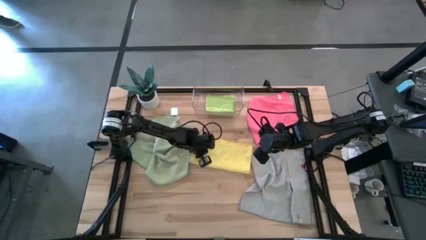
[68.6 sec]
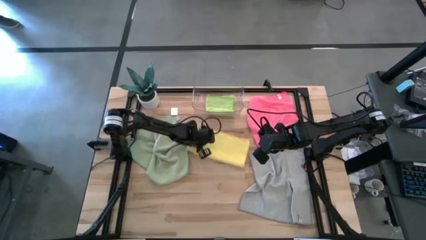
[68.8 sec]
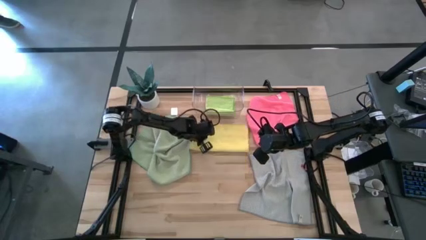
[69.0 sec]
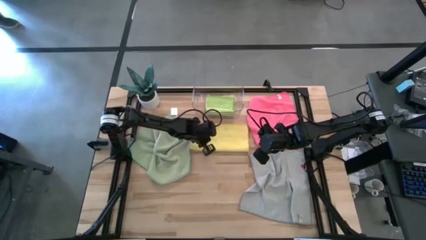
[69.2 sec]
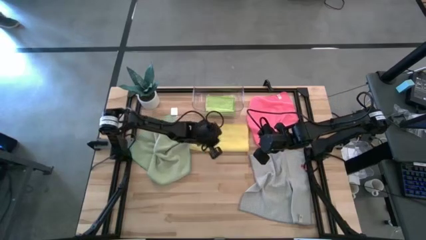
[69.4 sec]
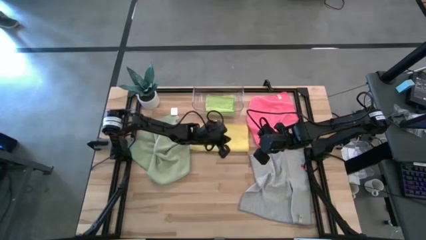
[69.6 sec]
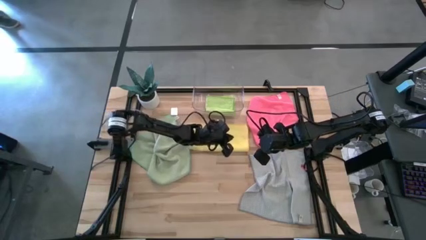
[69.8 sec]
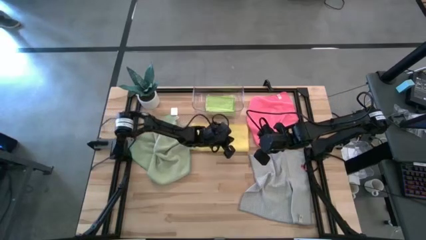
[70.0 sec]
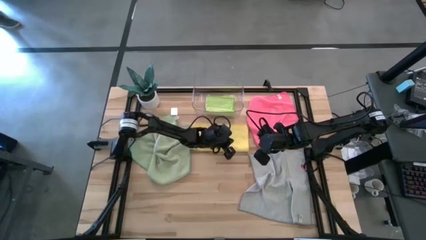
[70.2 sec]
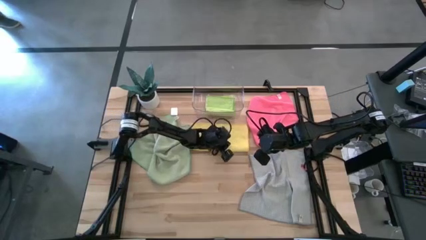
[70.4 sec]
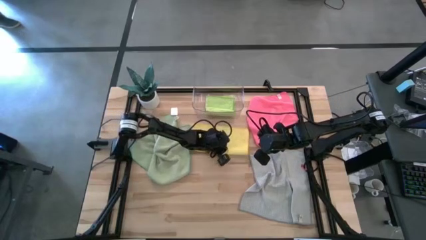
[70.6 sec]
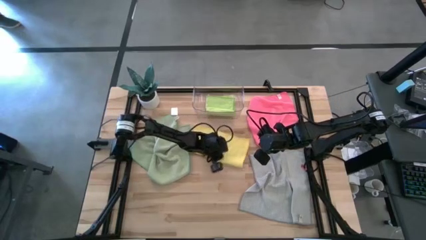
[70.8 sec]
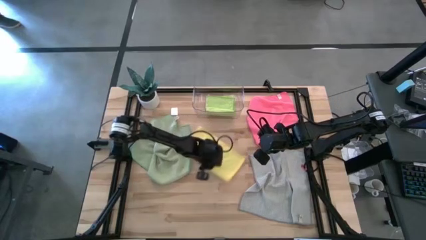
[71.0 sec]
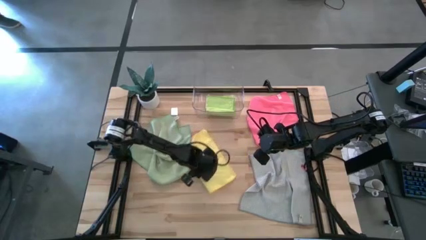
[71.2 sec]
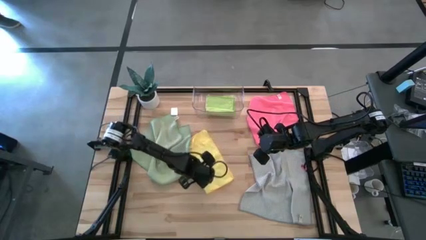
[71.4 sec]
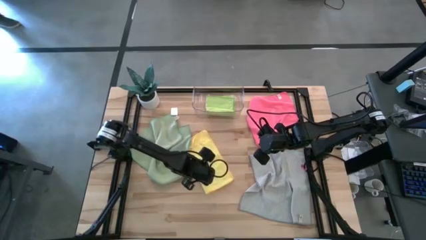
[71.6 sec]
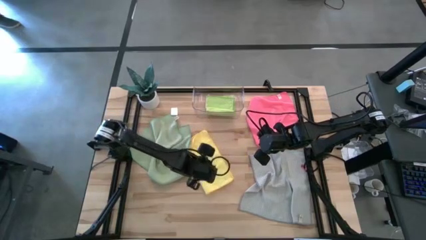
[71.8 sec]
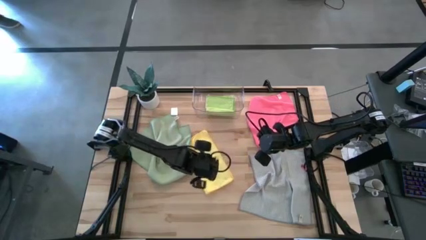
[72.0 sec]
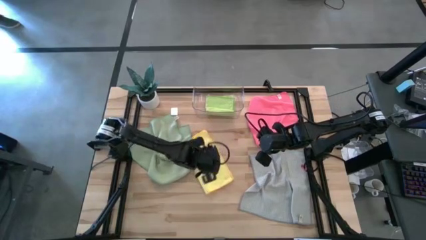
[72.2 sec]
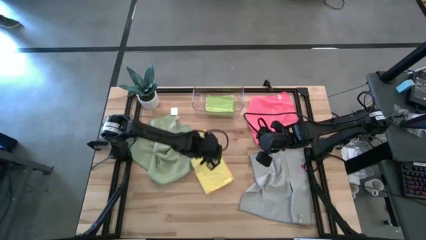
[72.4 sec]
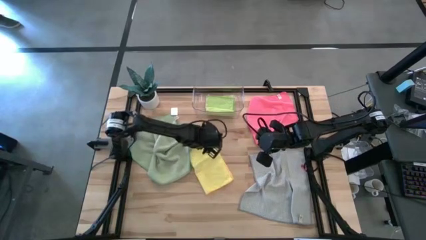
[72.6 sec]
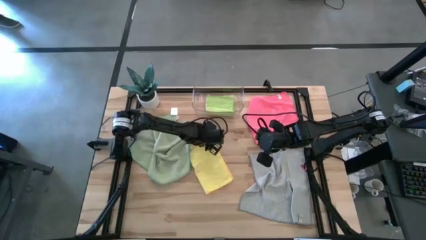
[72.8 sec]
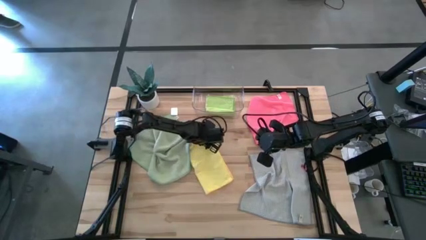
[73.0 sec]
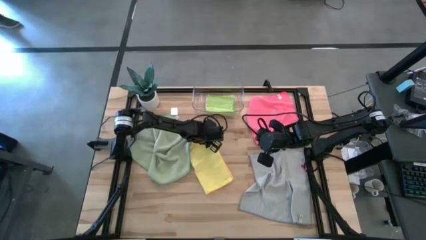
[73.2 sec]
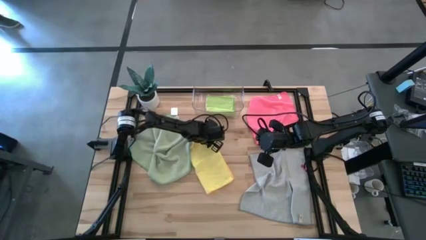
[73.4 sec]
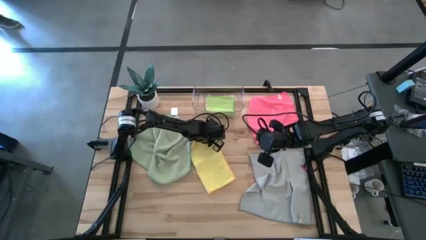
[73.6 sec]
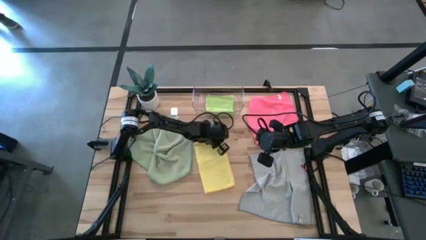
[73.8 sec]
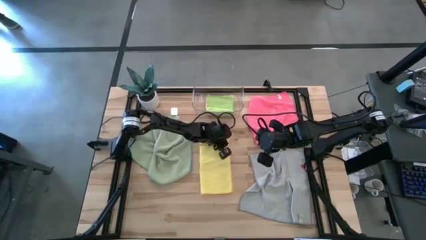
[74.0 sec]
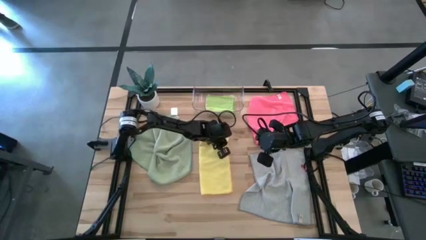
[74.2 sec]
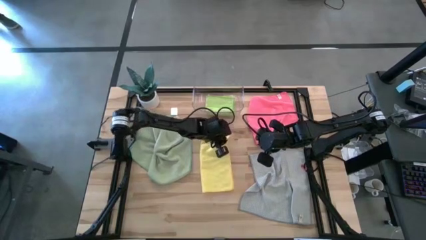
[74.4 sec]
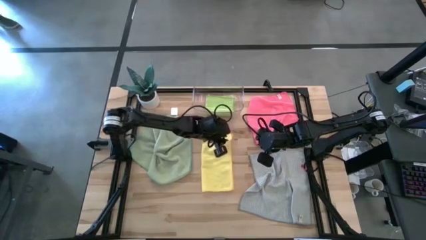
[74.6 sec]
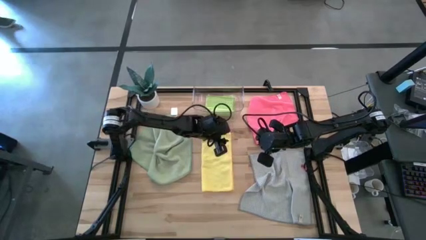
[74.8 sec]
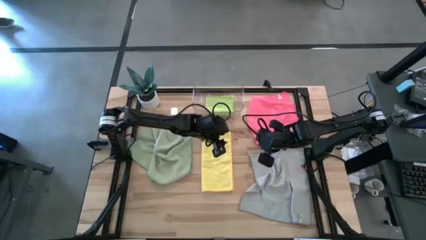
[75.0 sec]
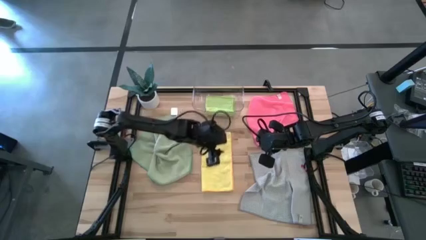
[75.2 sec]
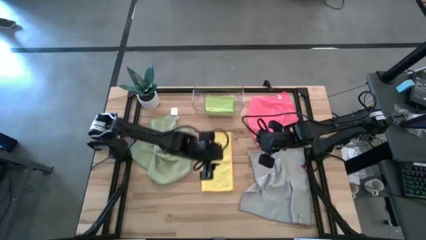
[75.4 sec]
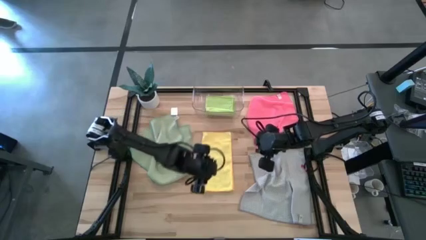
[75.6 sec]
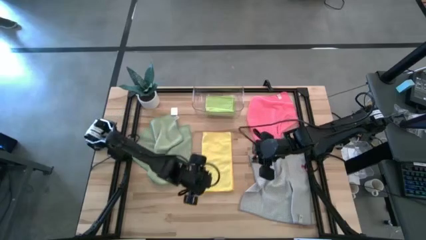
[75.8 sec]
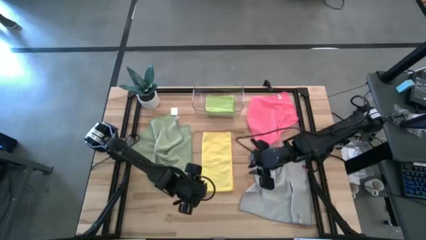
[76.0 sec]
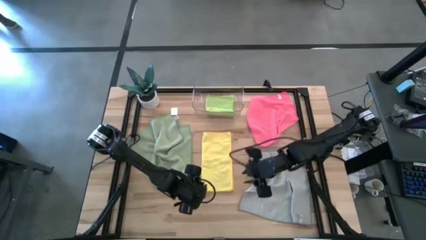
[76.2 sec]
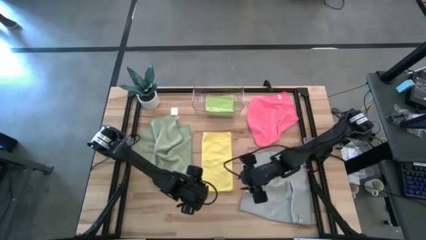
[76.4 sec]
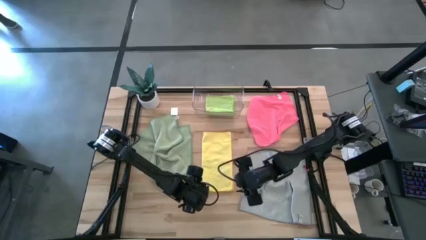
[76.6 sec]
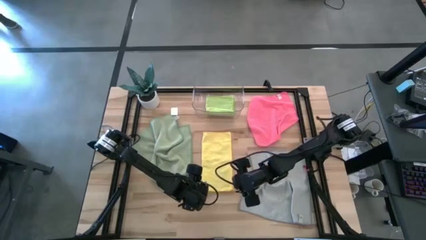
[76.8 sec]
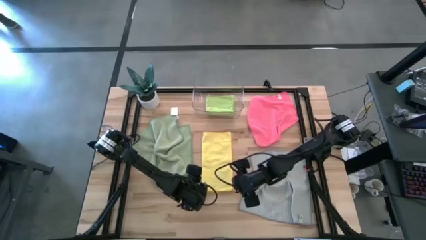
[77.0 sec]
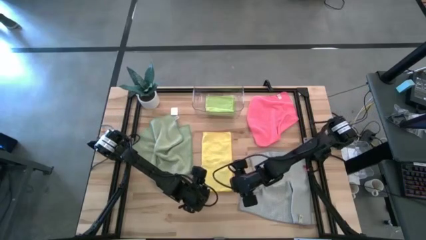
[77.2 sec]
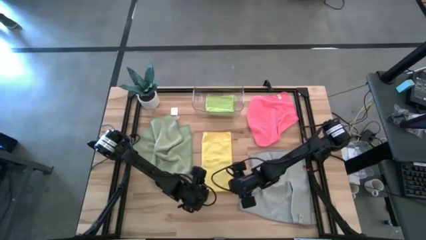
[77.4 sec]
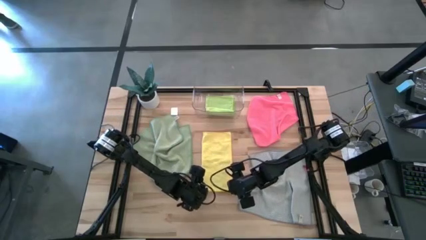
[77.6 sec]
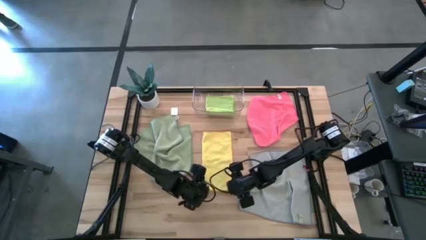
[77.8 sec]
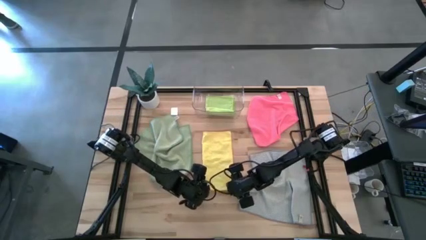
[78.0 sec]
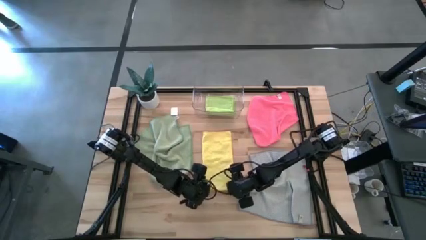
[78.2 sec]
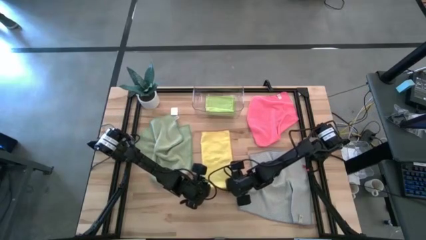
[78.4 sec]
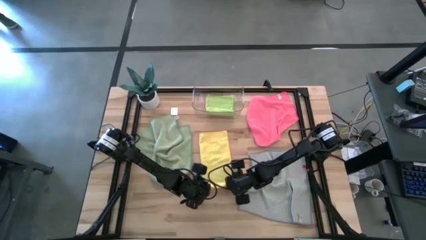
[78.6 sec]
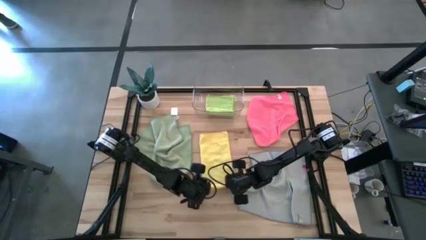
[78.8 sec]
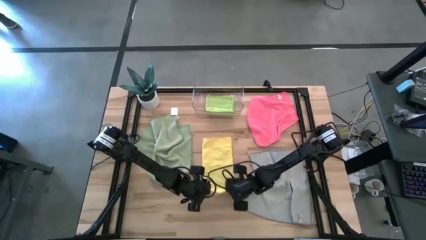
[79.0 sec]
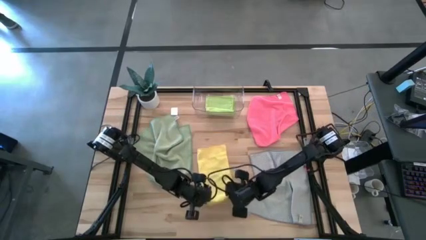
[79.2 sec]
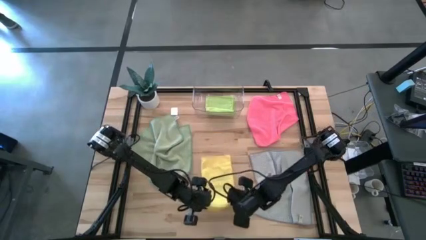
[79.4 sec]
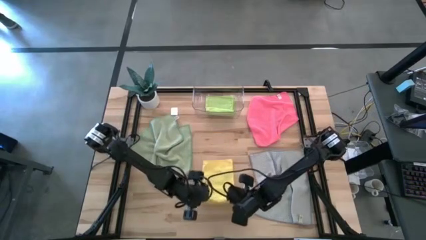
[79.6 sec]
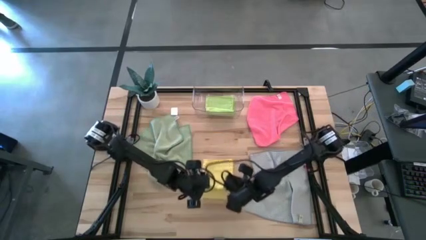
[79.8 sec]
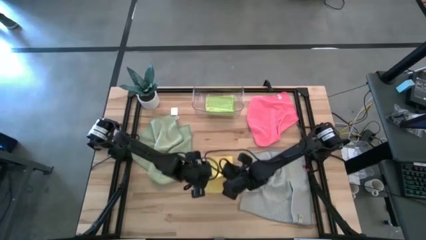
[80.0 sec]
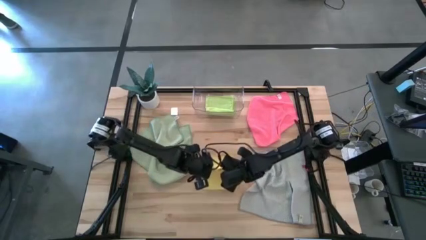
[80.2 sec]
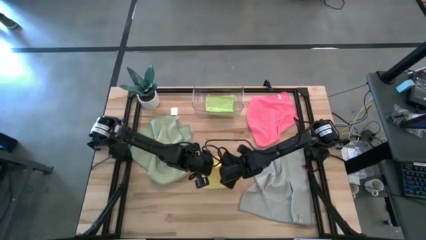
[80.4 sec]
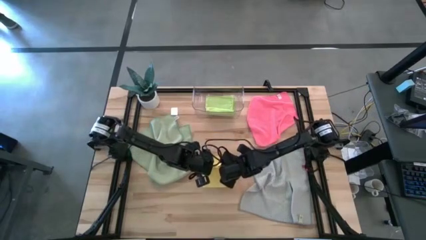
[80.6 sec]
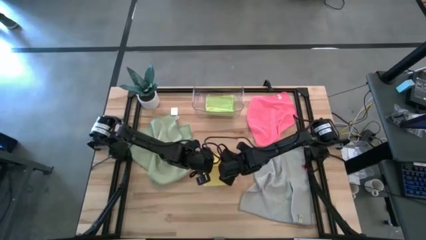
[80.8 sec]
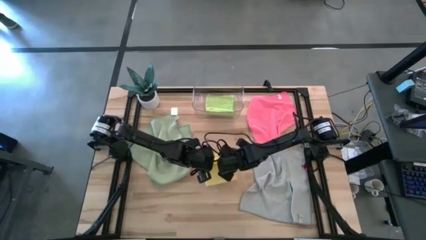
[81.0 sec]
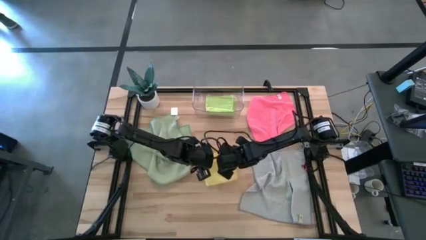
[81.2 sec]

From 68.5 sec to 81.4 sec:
Task: Fold microfiber towels
Fold the yellow microfiber cloth

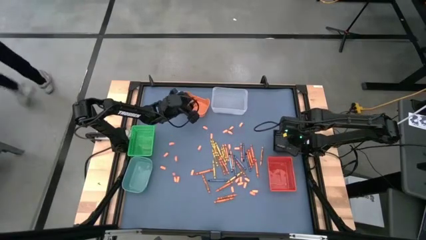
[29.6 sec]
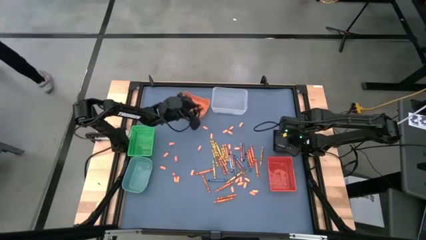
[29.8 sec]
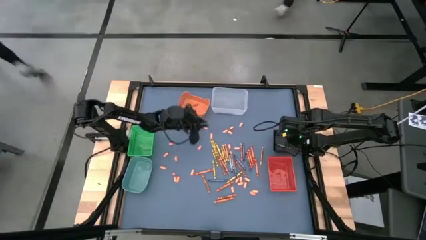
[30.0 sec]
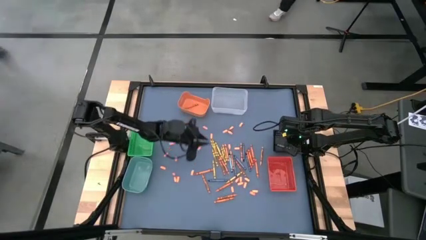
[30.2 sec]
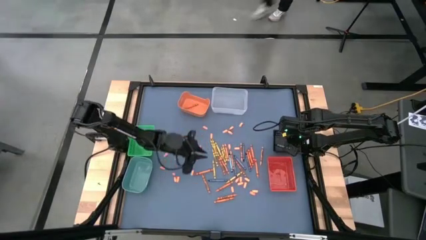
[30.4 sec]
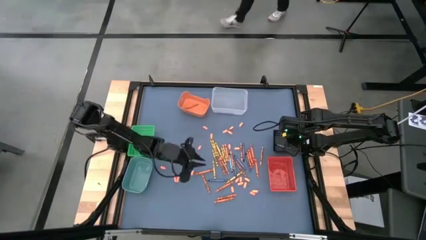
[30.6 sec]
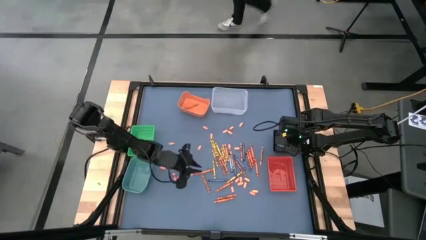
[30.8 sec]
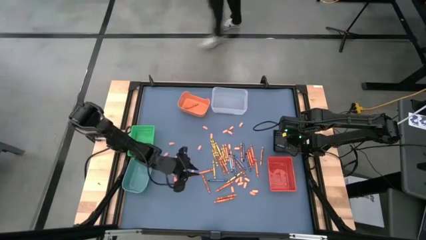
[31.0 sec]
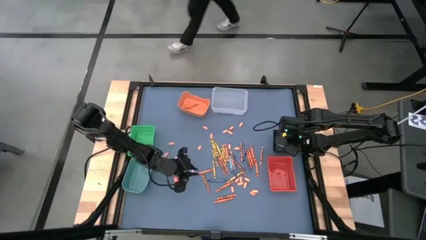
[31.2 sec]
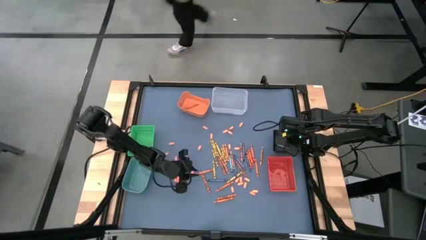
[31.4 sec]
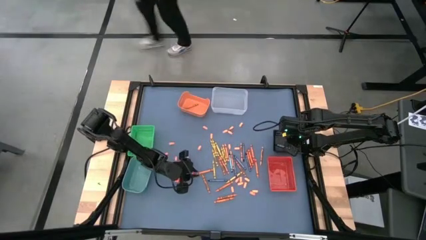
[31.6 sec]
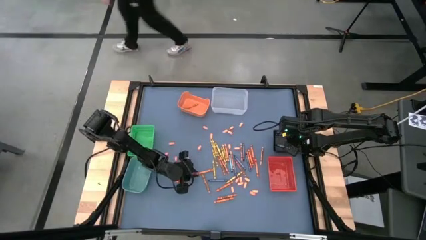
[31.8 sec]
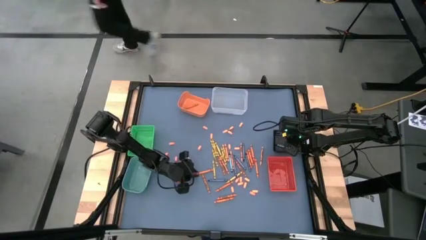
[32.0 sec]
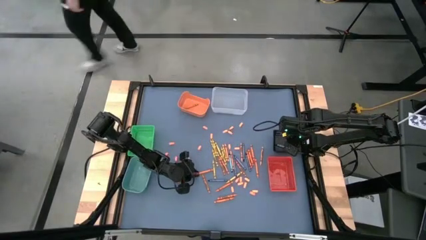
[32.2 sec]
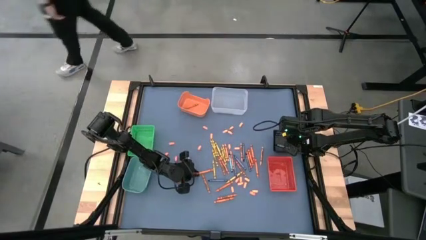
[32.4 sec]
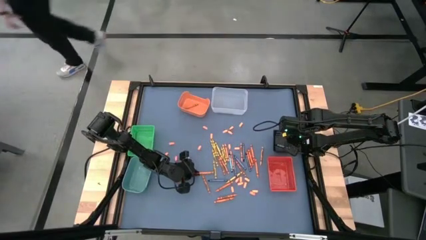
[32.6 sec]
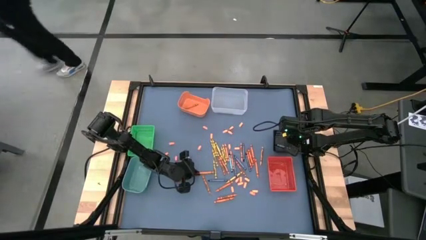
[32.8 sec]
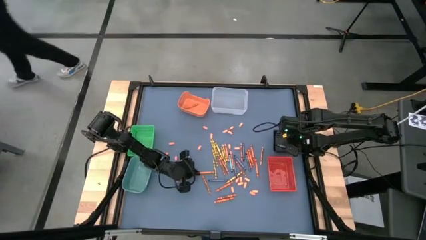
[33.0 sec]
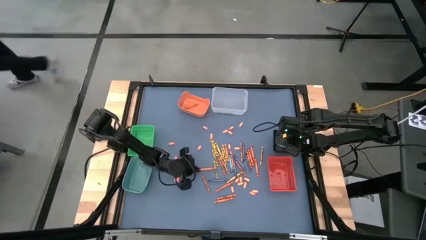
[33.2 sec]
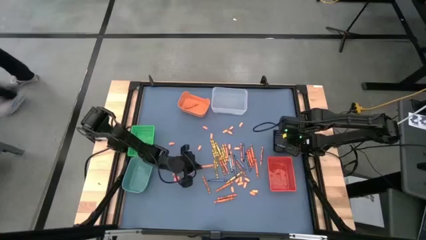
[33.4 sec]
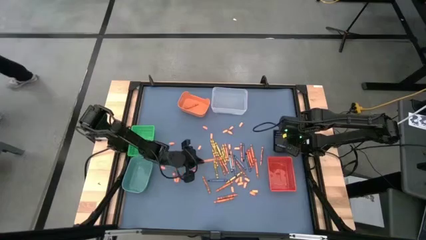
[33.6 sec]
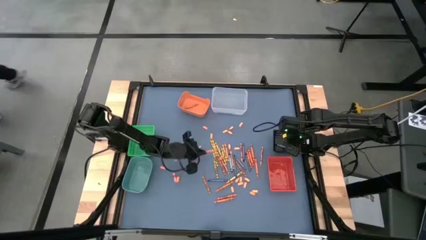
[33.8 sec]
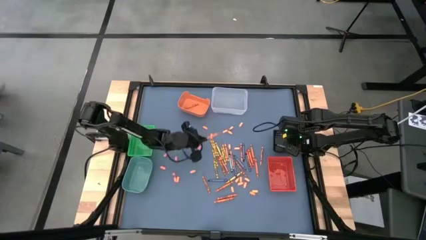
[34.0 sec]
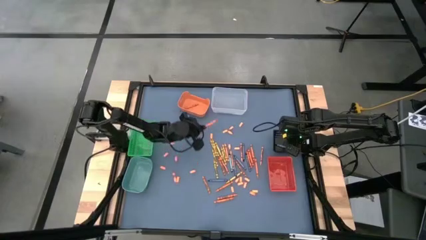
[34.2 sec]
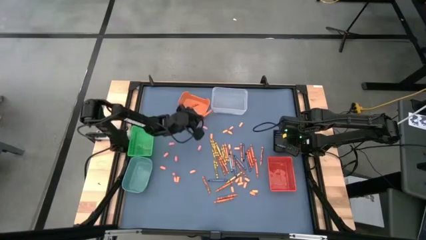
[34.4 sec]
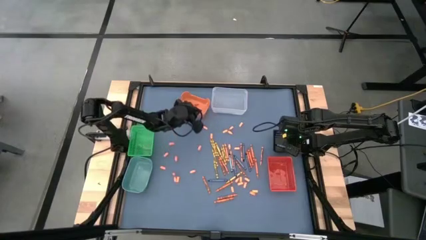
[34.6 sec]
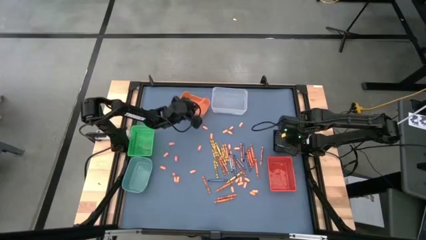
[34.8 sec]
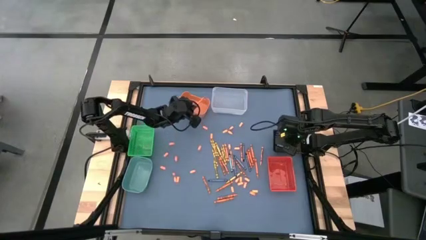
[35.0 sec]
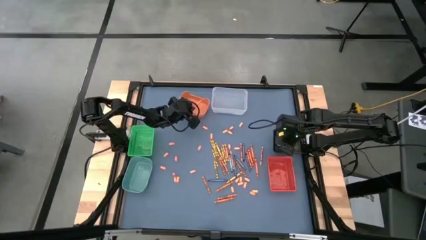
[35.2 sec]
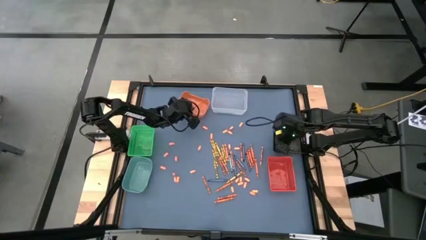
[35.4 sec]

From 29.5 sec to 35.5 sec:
Task: Sort crayons
Put the red crayon into the orange bin
